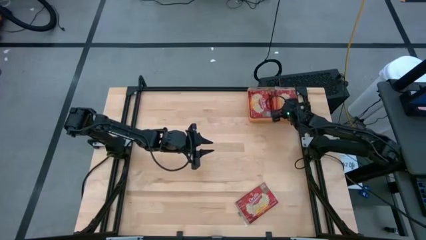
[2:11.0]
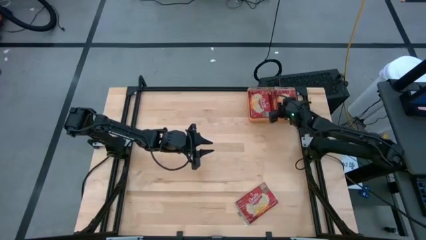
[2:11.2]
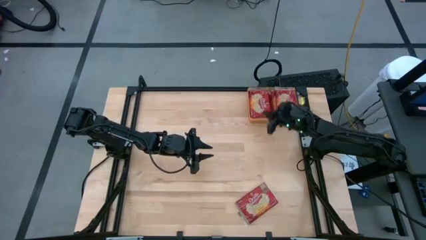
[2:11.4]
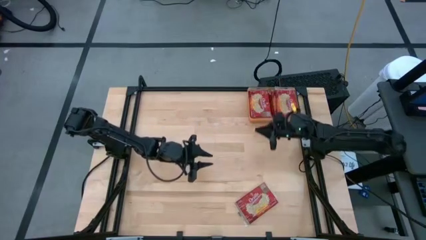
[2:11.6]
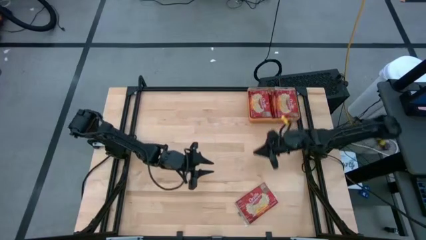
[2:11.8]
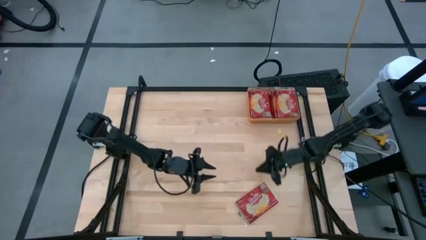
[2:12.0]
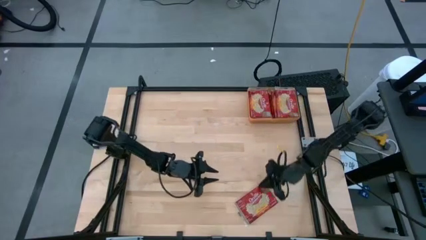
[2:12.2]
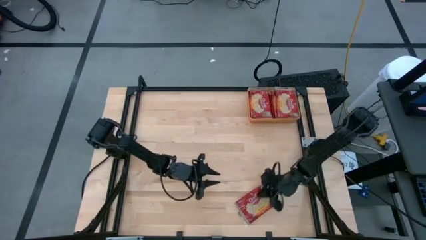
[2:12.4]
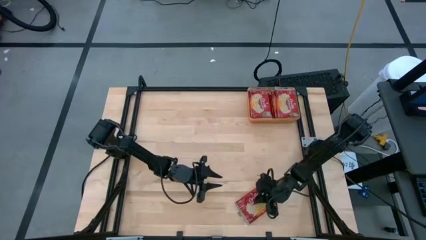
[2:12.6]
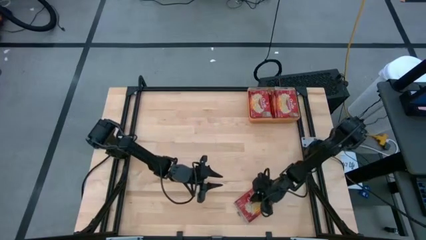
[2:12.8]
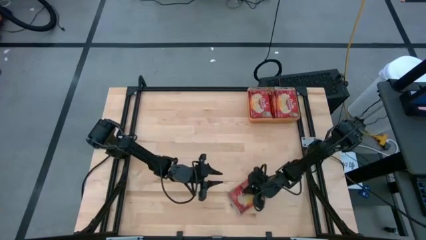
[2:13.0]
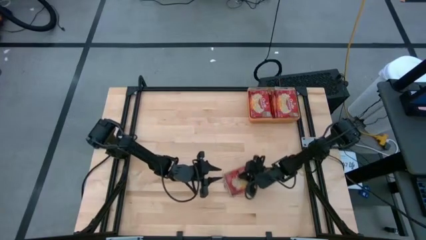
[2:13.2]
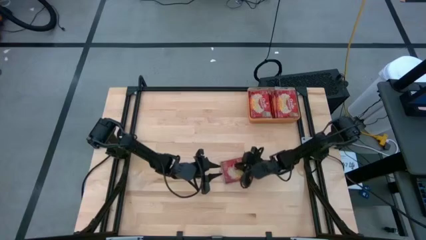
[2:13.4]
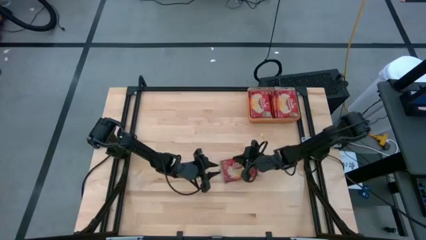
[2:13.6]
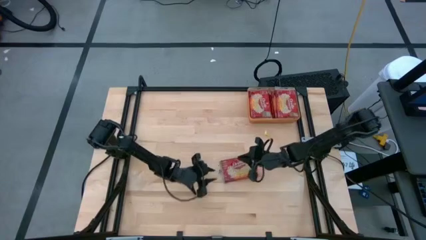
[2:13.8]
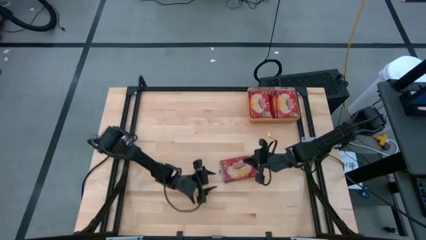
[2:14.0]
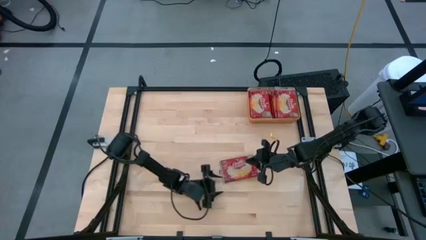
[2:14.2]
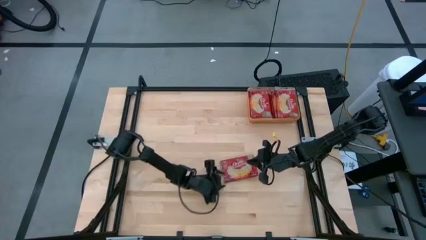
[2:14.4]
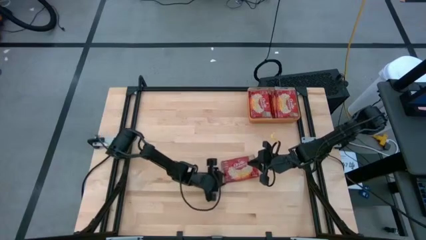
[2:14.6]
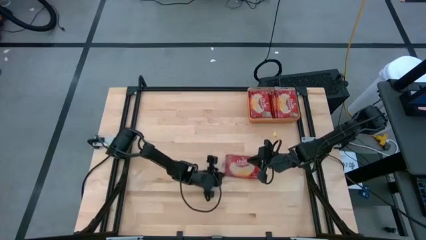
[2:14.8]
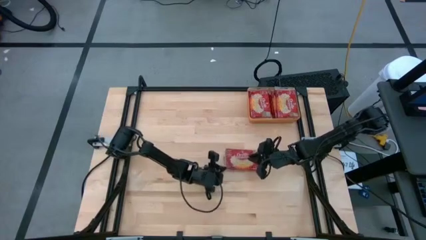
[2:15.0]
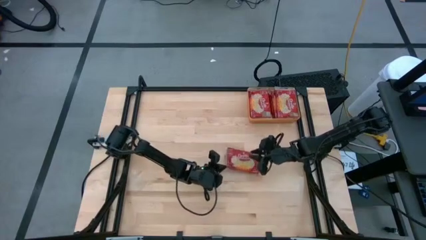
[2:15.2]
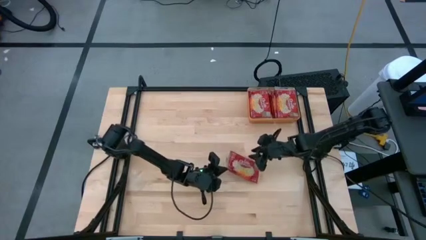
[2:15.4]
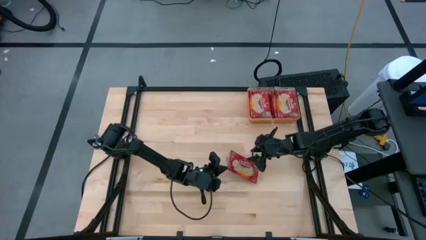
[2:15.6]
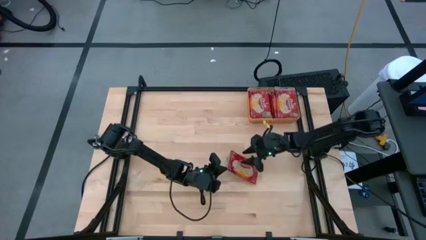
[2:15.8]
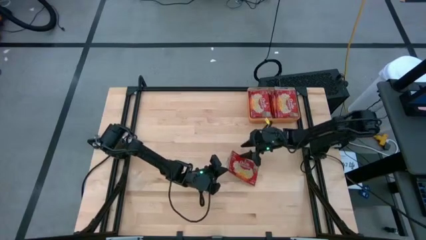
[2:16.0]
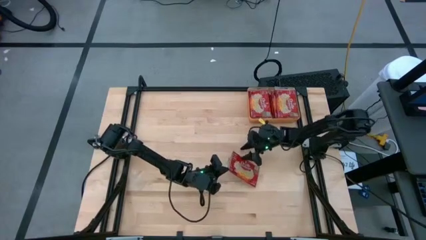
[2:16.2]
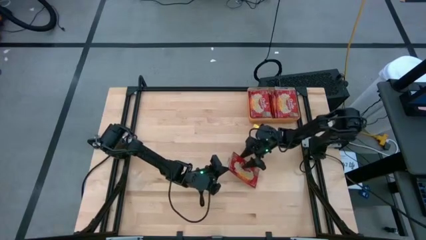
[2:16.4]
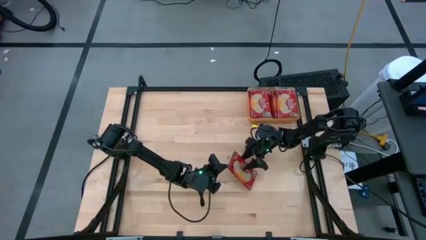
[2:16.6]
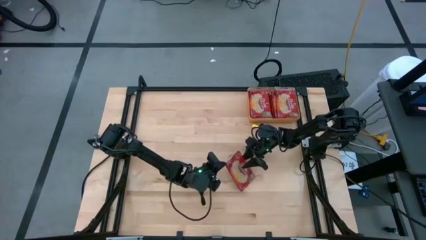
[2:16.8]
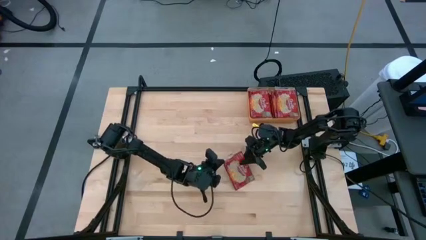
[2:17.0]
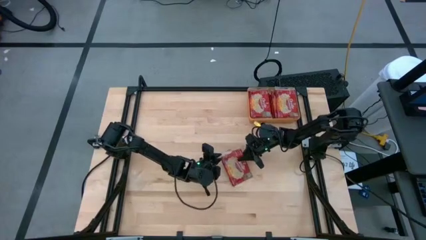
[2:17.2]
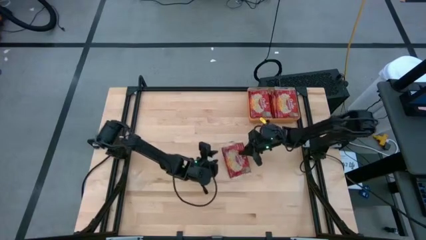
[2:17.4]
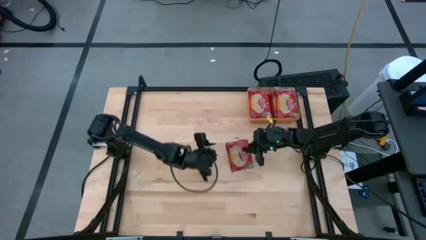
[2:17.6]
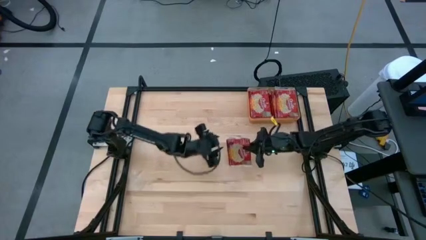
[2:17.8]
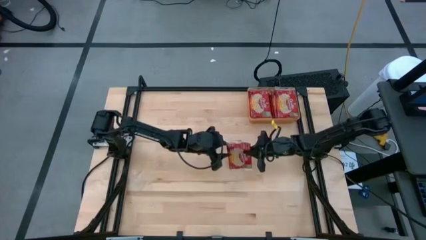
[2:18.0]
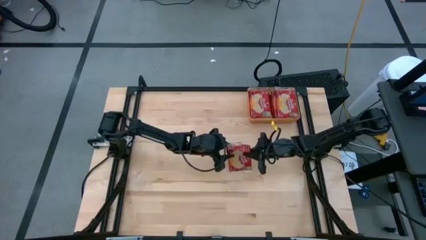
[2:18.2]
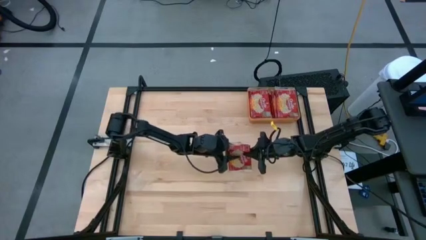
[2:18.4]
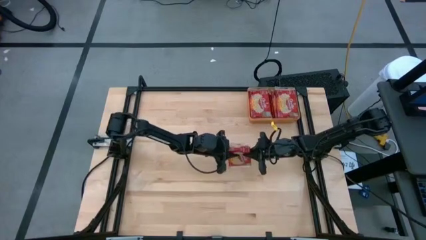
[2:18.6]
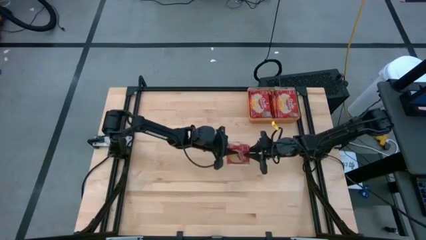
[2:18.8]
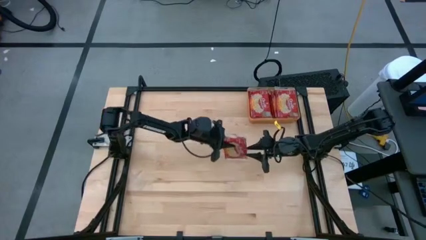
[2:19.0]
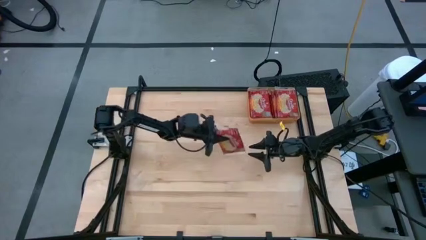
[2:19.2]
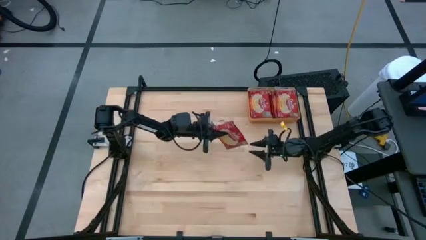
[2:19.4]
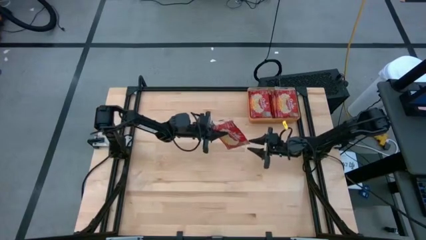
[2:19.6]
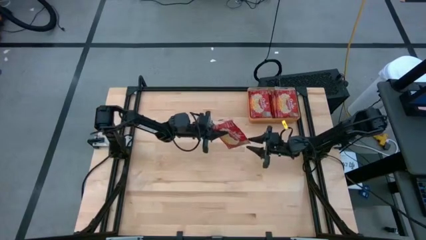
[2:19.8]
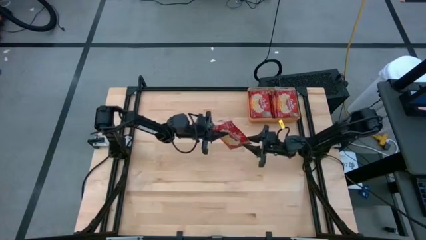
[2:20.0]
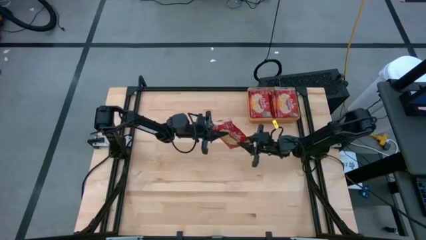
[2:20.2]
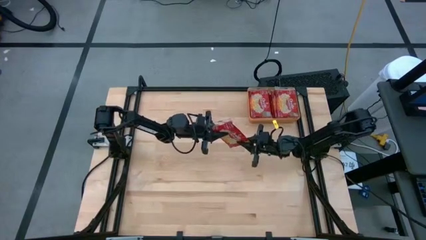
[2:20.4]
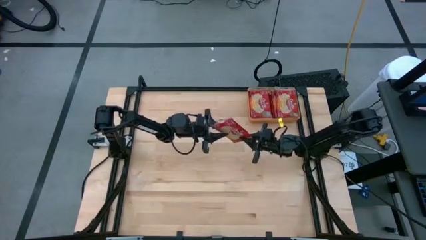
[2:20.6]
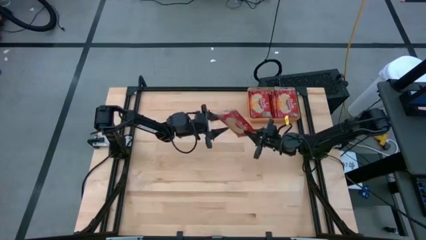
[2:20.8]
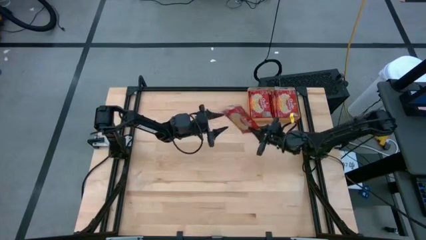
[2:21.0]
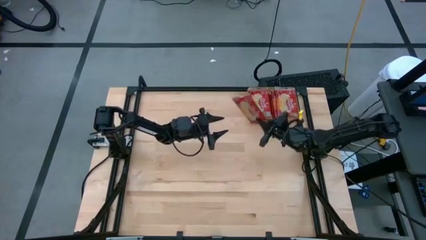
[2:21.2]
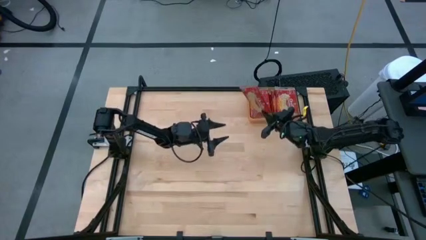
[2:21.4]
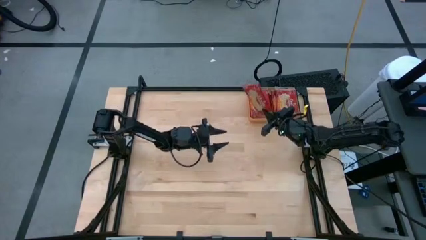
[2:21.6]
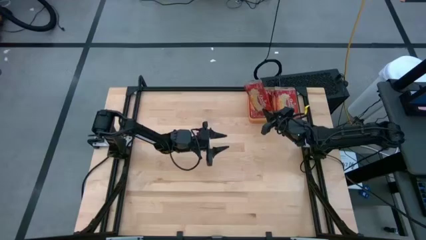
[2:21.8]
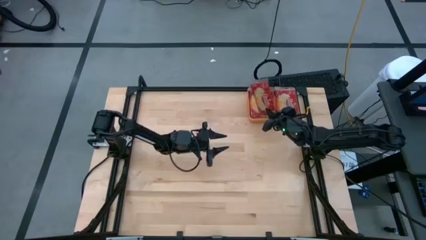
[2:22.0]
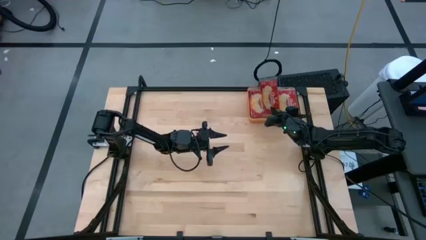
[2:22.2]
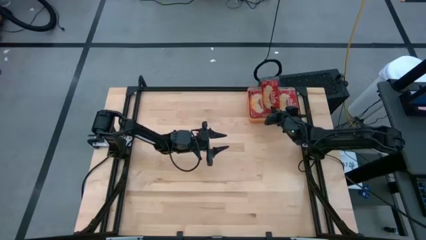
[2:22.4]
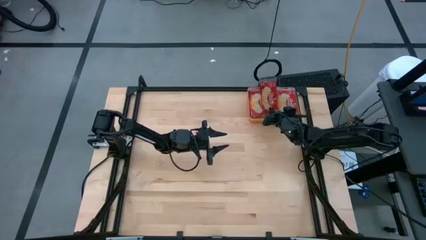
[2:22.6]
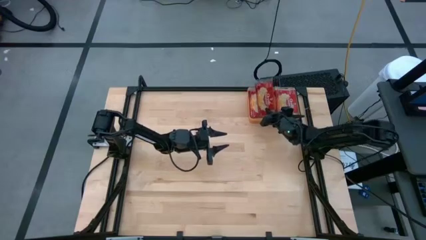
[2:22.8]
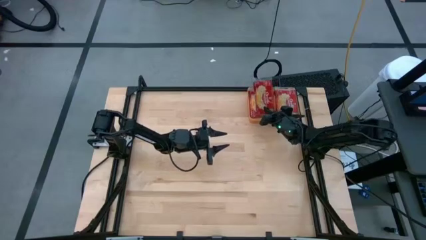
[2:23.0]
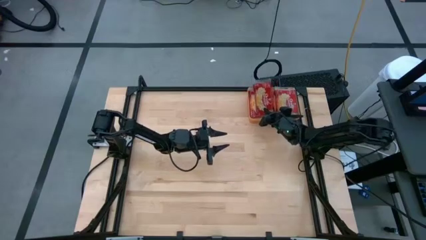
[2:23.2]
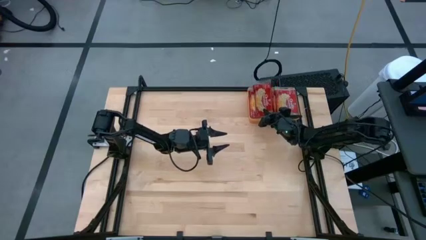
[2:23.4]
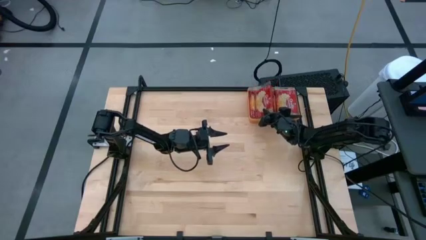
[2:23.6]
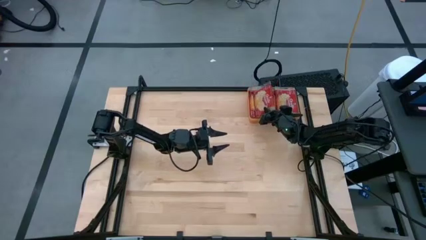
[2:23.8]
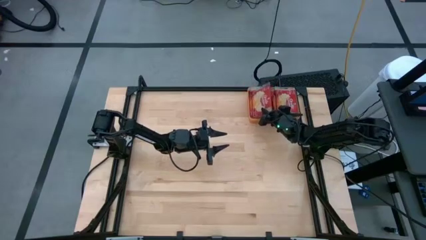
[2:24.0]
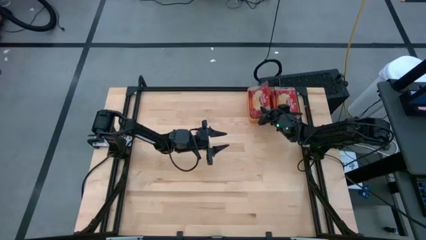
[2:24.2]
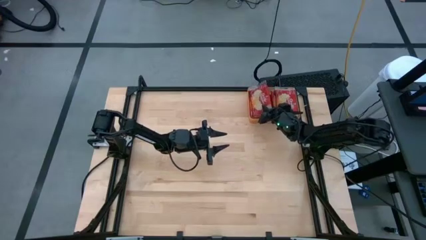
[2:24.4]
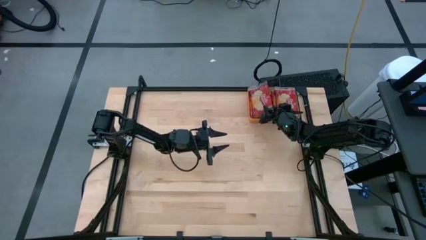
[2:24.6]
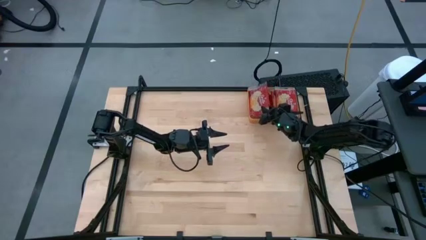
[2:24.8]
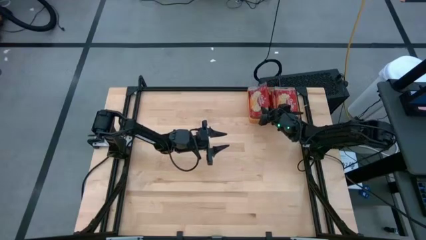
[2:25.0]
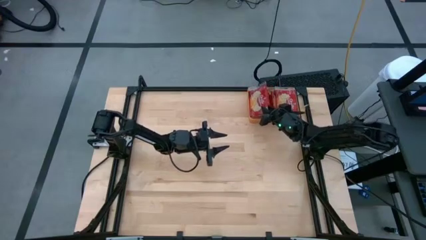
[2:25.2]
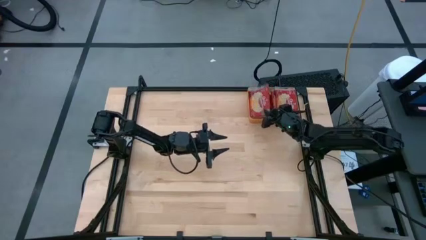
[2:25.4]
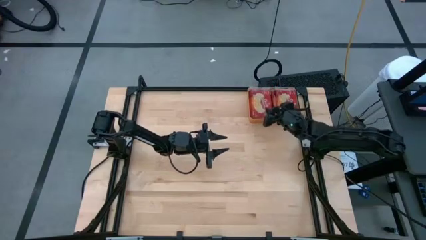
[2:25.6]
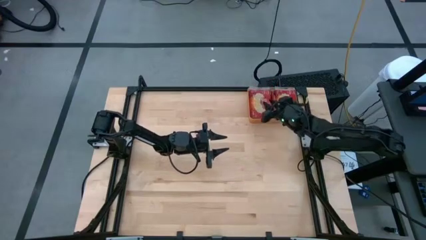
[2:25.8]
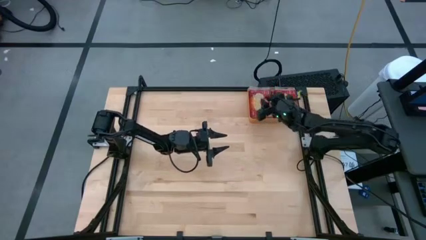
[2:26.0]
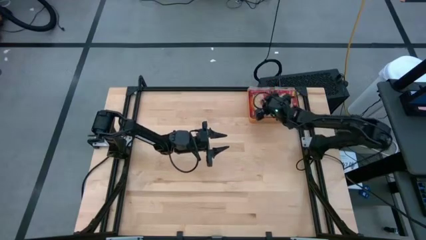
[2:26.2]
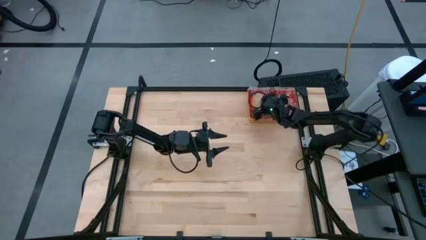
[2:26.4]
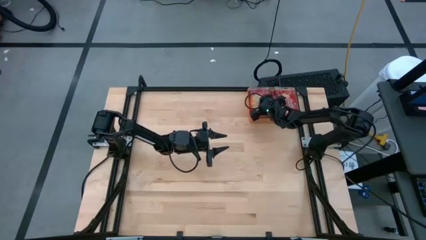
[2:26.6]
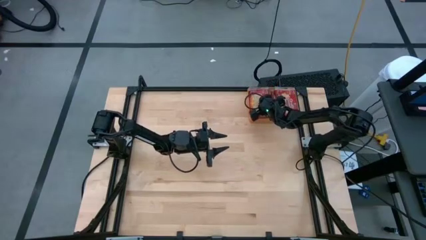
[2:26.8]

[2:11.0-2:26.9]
Task: Sort popcorn bags into baskets
Put the red popcorn bag into the orange bin
